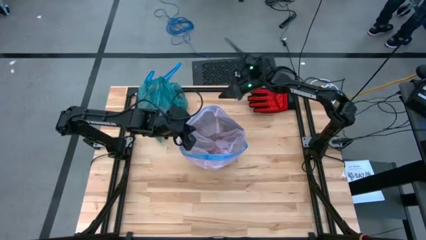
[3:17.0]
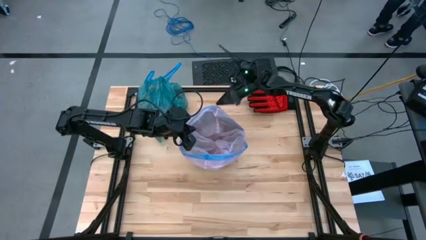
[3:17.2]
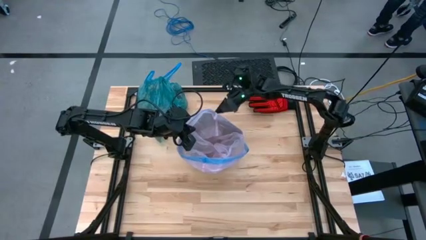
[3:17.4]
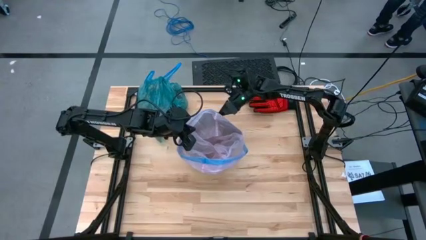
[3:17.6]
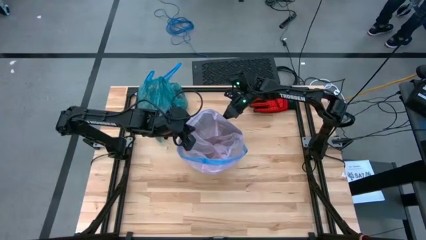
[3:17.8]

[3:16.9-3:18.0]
Task: place trash/remove bag and relplace
Insert the new pink trash bag into the trash bin

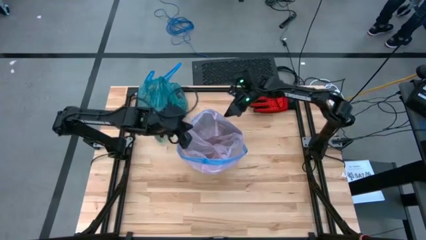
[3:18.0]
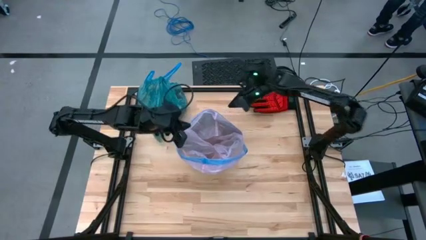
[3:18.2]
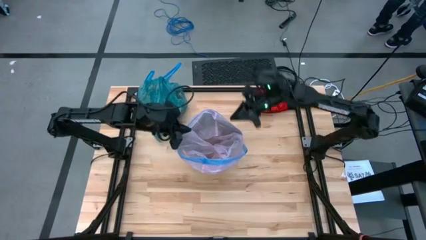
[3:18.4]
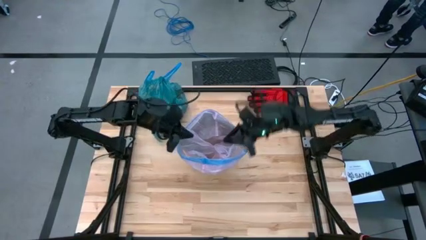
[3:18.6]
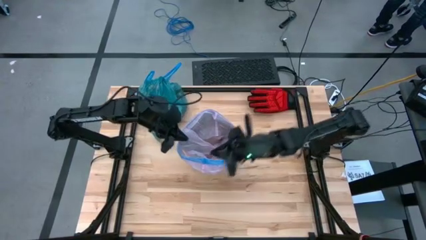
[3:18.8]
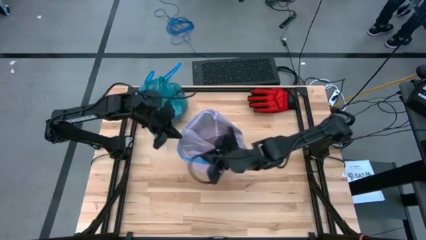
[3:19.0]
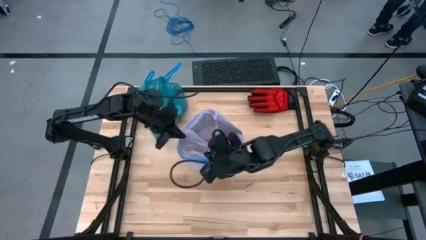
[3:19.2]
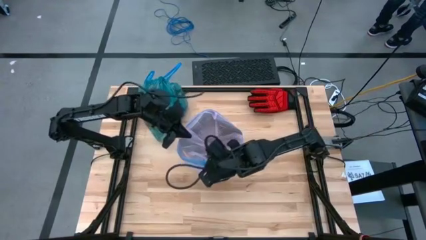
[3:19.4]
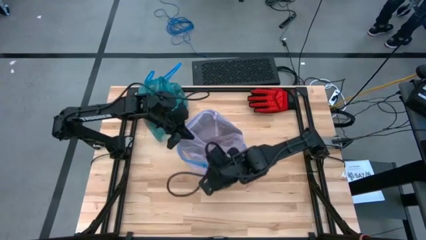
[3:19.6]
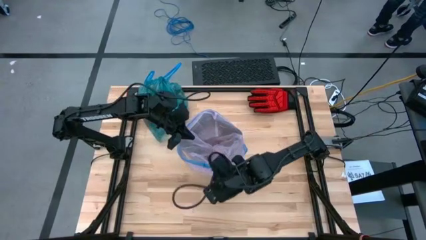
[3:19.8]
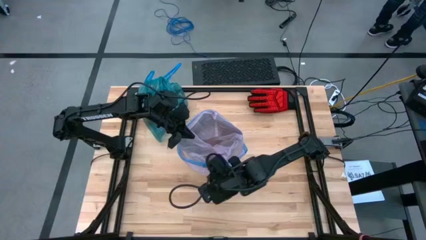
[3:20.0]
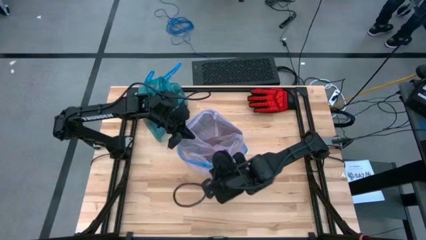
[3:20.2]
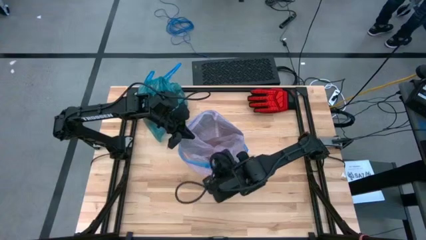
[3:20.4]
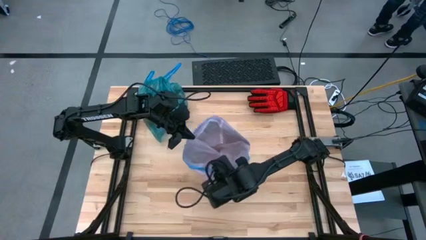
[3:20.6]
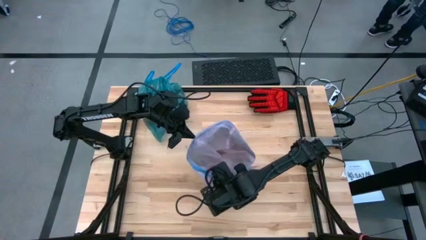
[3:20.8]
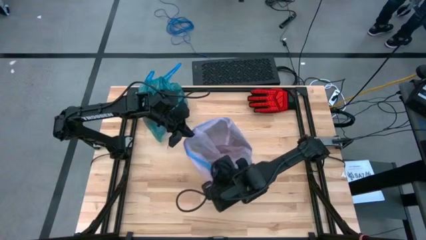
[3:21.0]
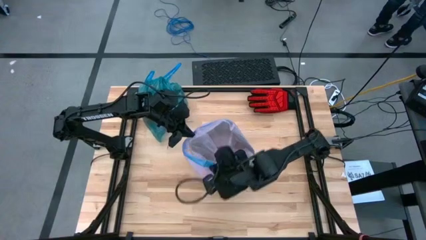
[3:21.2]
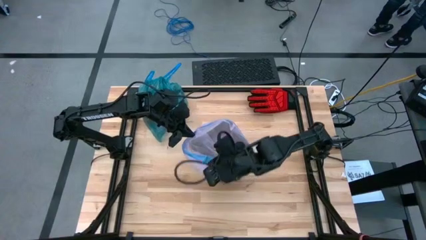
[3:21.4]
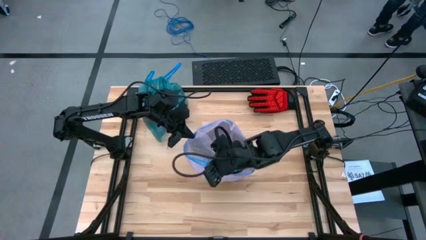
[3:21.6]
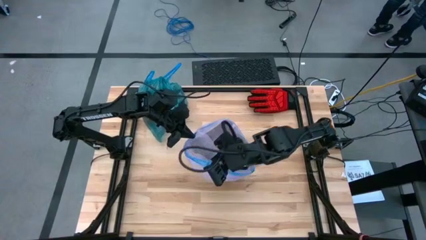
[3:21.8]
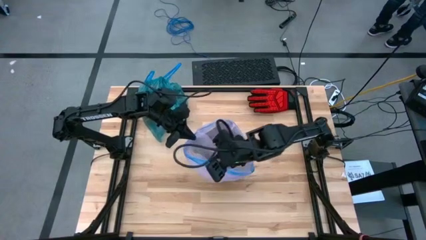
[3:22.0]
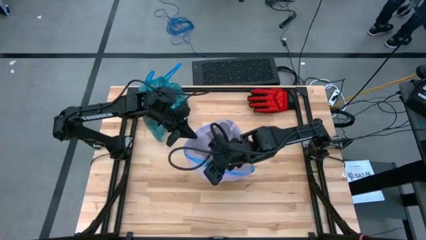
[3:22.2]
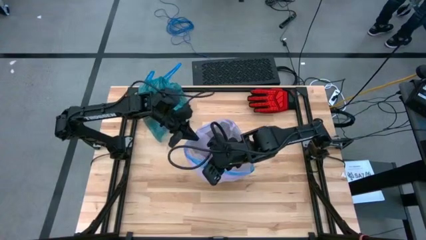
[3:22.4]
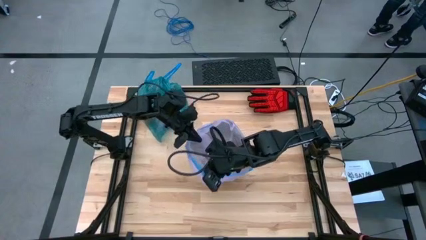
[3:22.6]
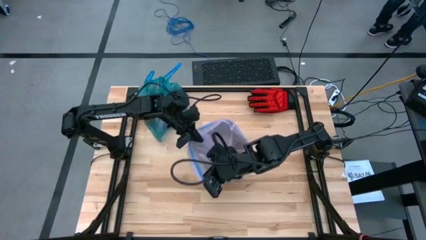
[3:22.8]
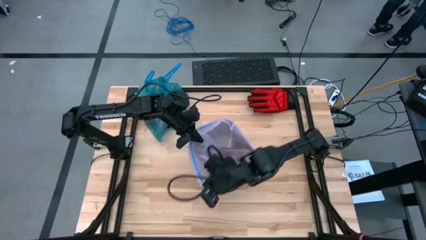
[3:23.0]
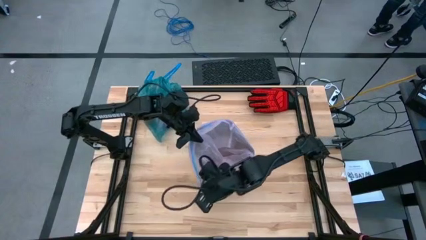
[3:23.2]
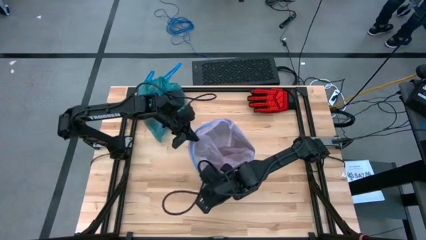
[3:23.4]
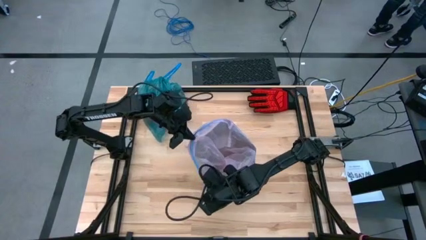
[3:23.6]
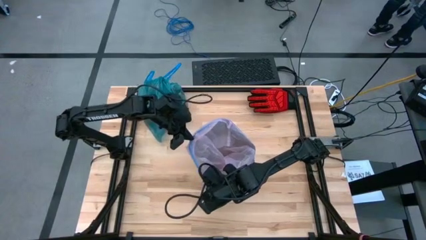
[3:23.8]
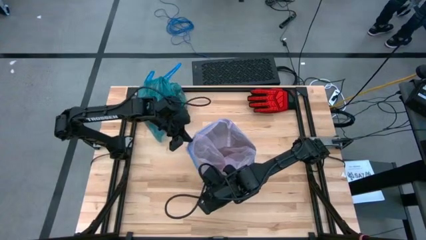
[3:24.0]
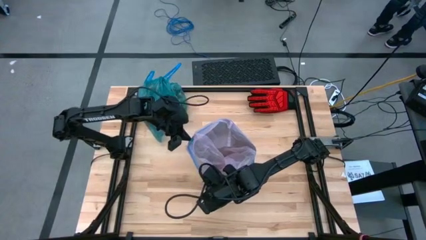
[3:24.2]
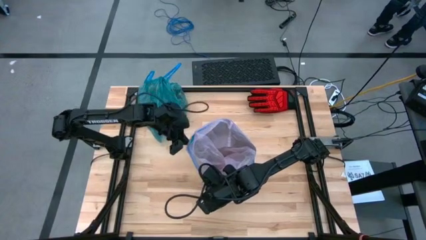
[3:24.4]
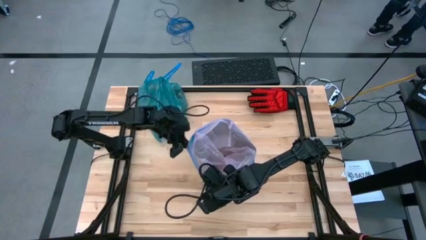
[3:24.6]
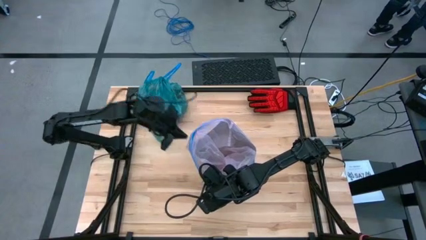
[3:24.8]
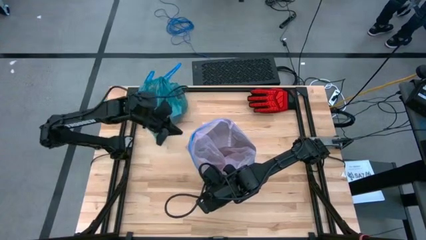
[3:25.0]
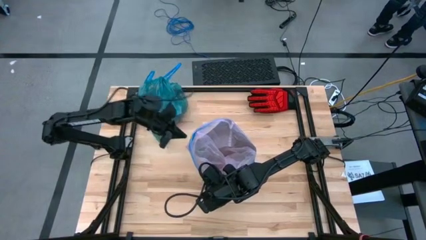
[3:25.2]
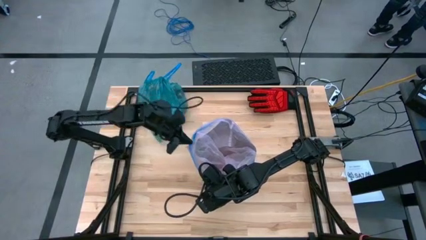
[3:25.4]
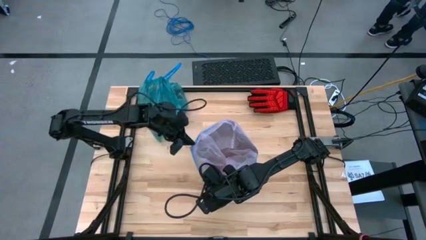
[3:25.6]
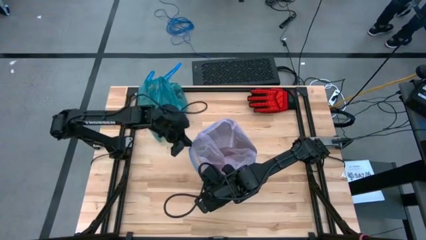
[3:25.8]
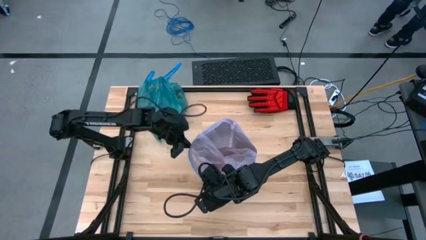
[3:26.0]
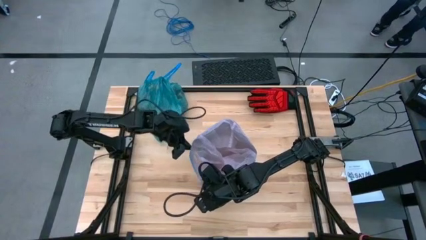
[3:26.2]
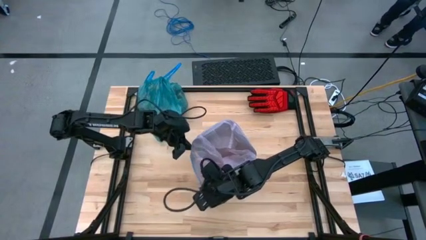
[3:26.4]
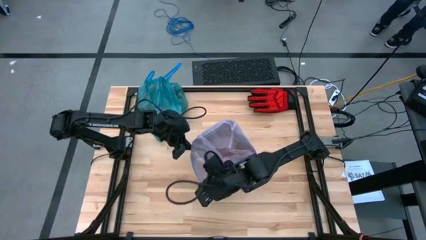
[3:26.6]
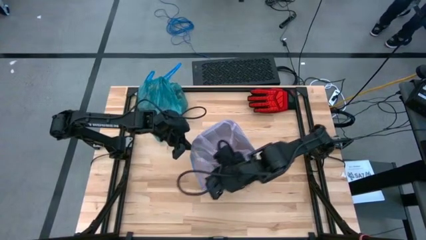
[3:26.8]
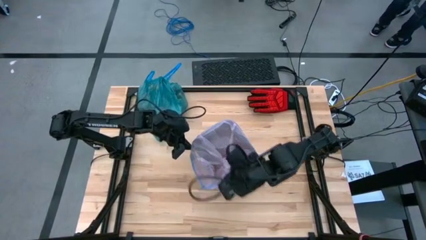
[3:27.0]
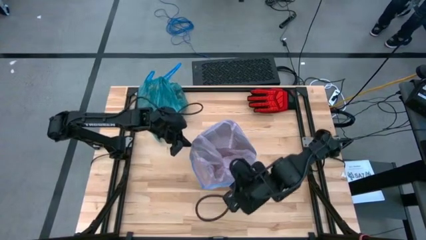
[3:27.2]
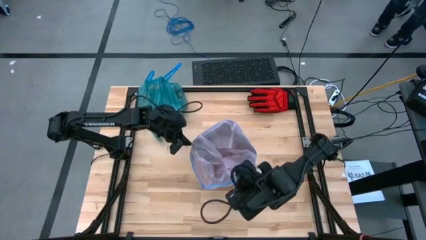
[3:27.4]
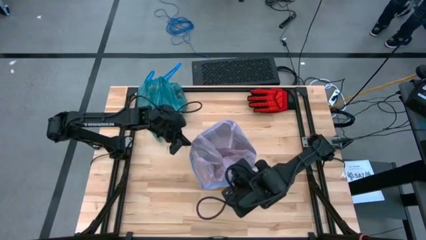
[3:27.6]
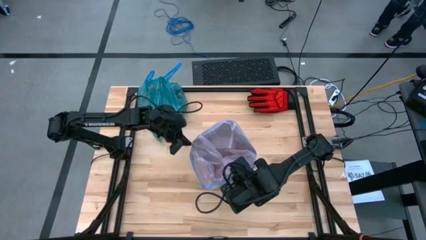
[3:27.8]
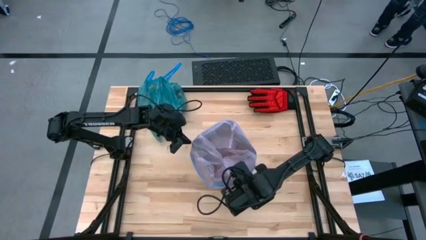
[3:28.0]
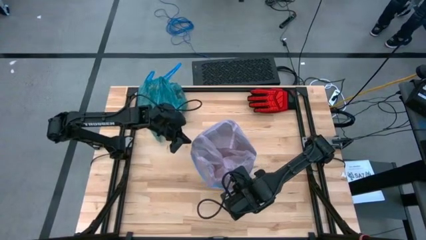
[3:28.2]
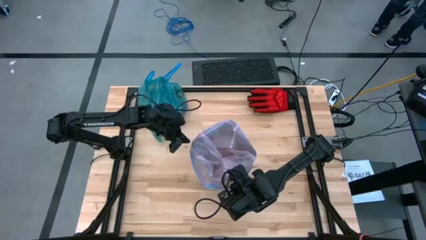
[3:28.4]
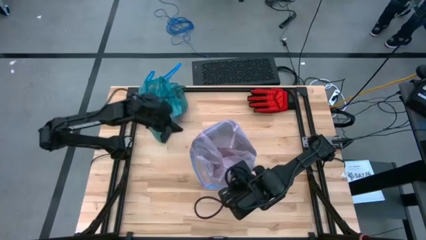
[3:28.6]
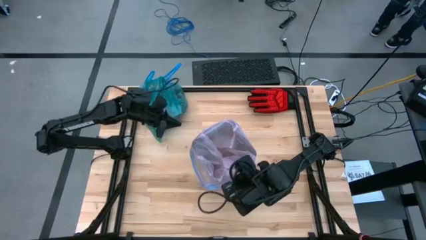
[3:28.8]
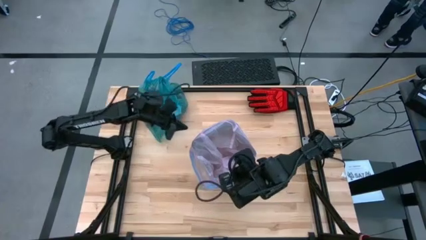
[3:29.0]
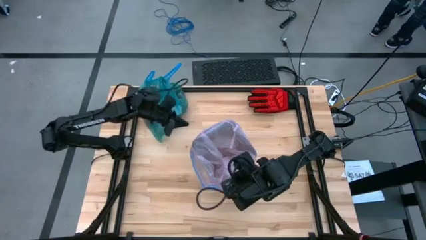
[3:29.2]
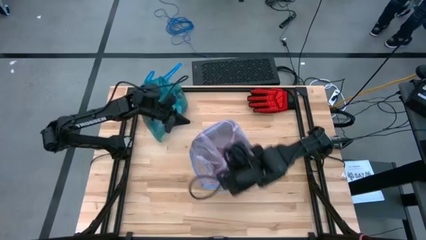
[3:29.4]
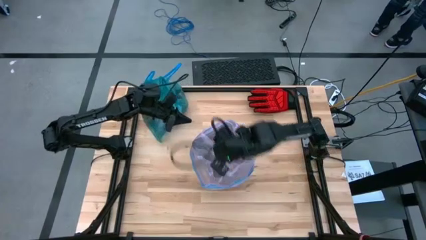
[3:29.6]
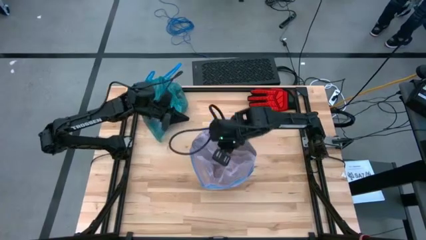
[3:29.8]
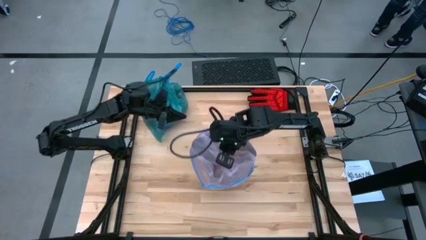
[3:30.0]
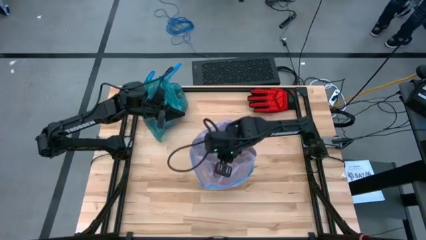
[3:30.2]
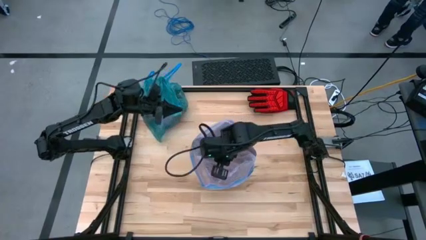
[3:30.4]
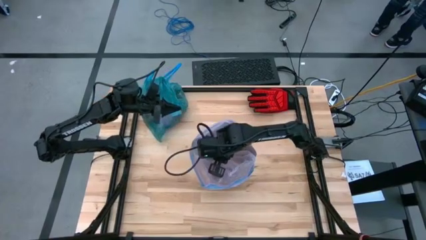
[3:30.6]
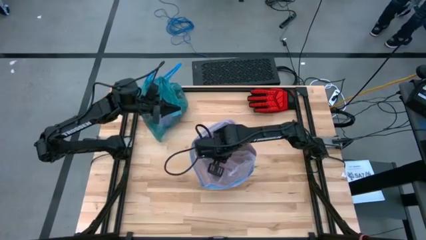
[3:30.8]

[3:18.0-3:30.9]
Insert the new pink trash bag into the trash bin
